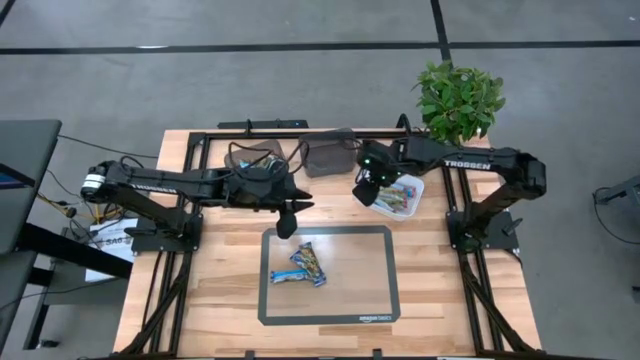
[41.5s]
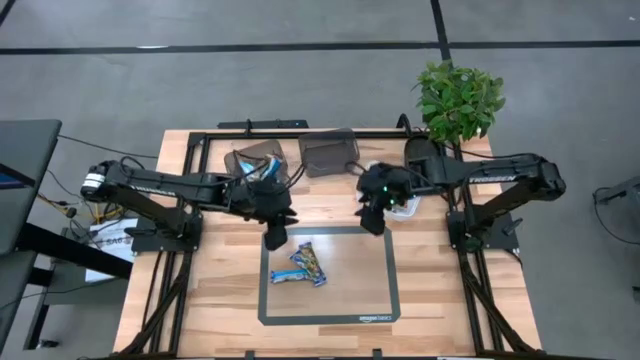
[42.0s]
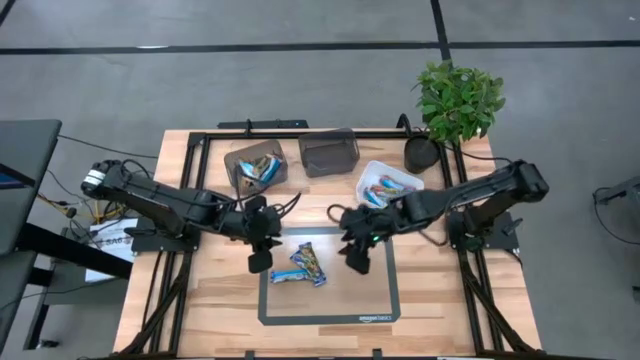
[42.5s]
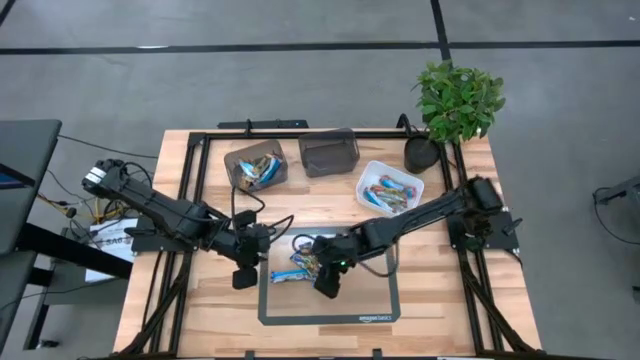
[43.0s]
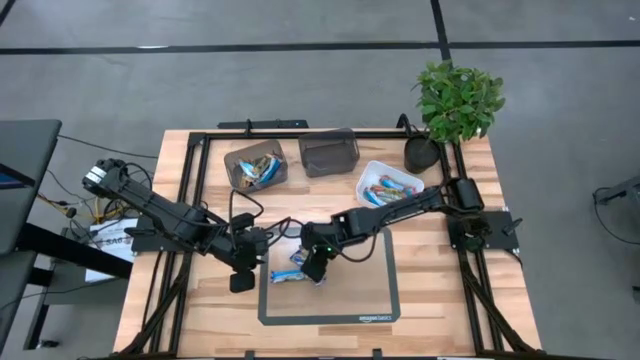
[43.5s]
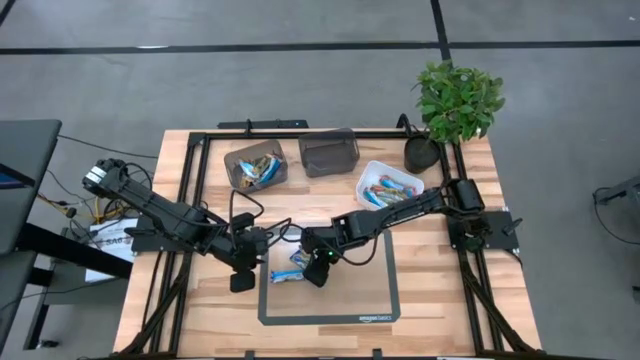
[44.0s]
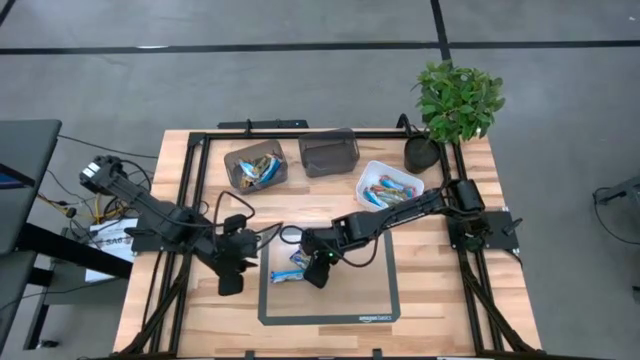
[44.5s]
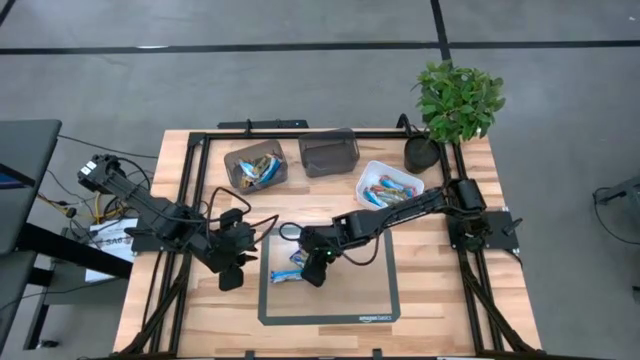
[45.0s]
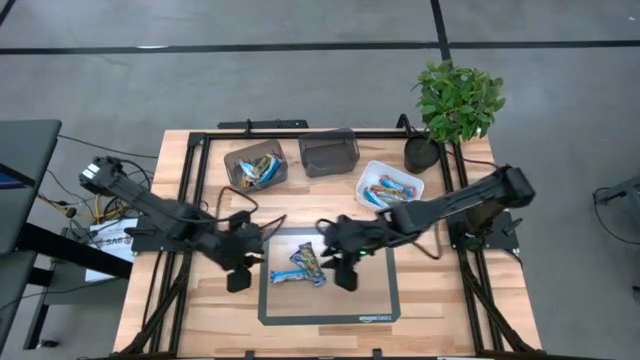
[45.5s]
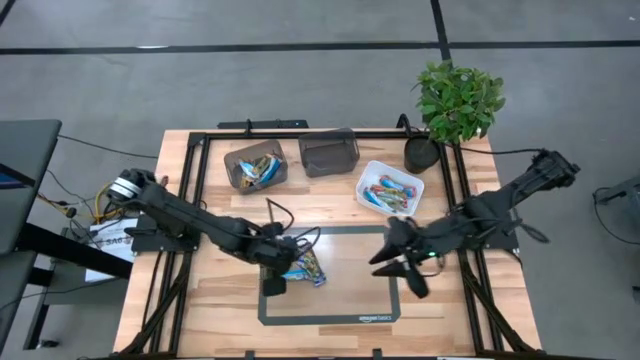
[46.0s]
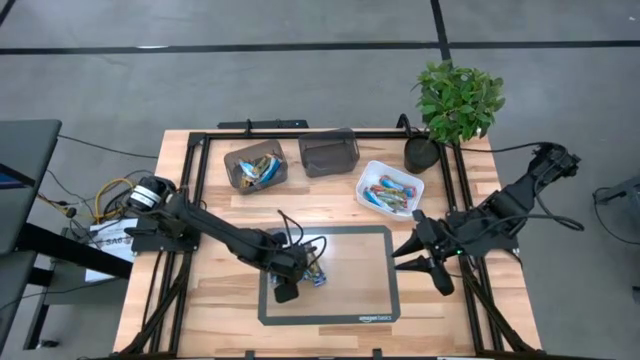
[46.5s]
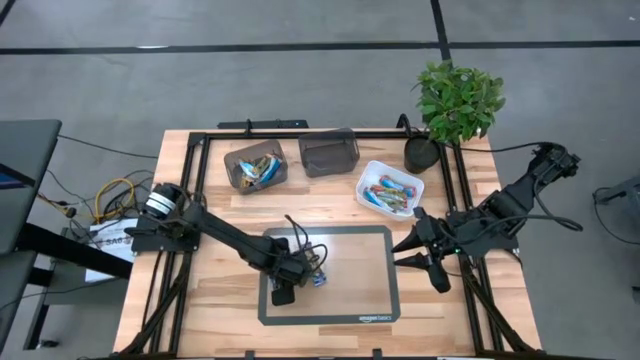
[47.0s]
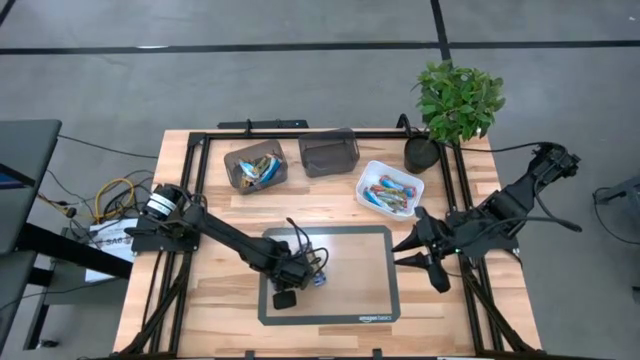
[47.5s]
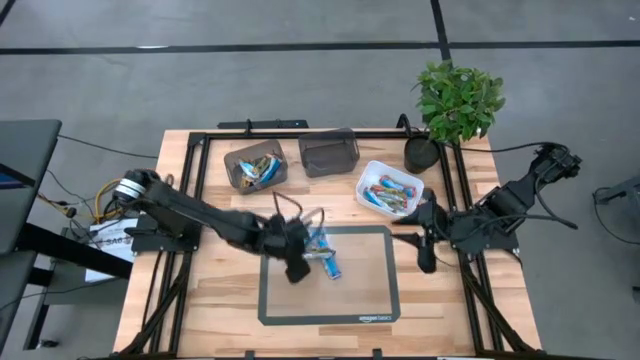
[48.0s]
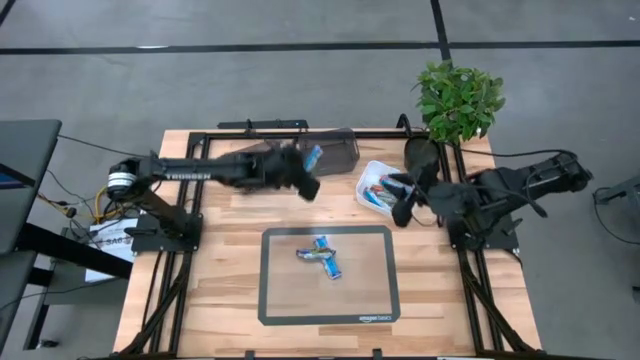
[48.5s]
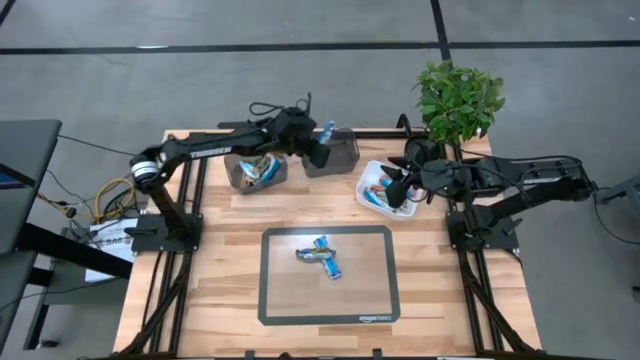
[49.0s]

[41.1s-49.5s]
Task: Pick and place Granola Bars by type
Put the blue granola bar into the right black bin

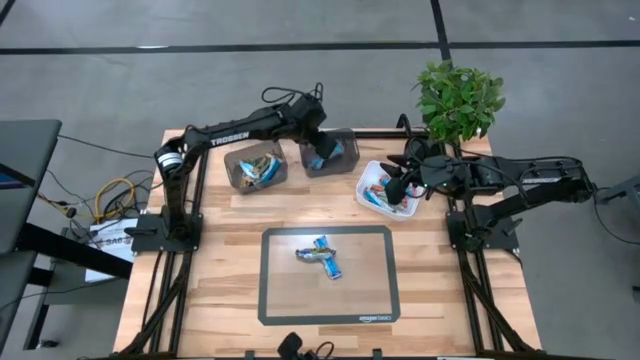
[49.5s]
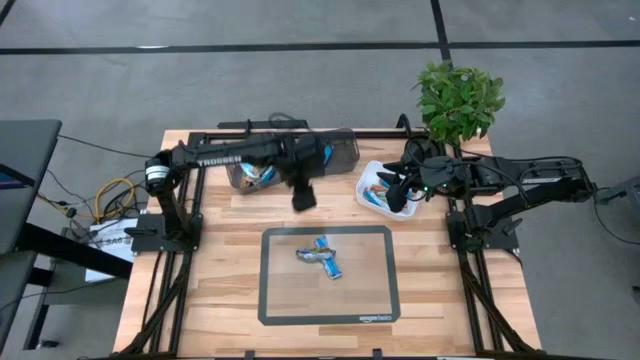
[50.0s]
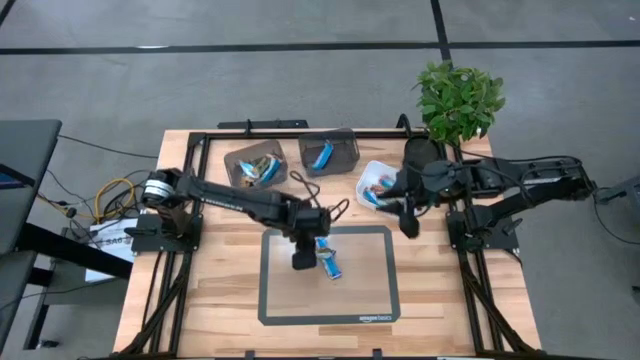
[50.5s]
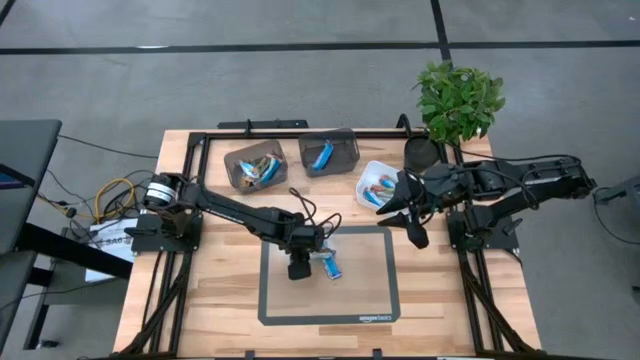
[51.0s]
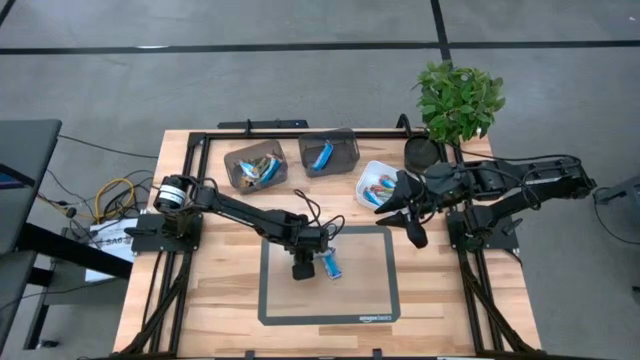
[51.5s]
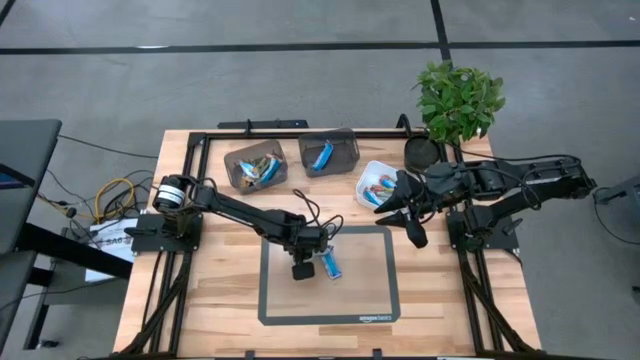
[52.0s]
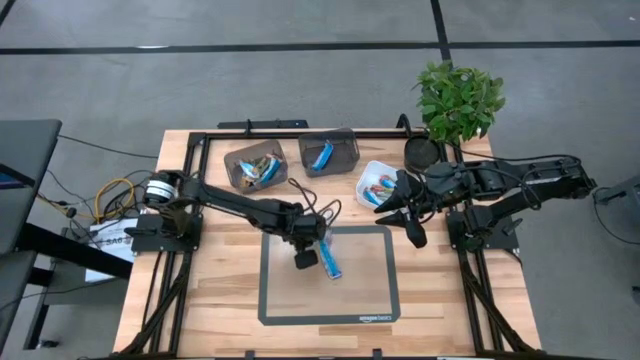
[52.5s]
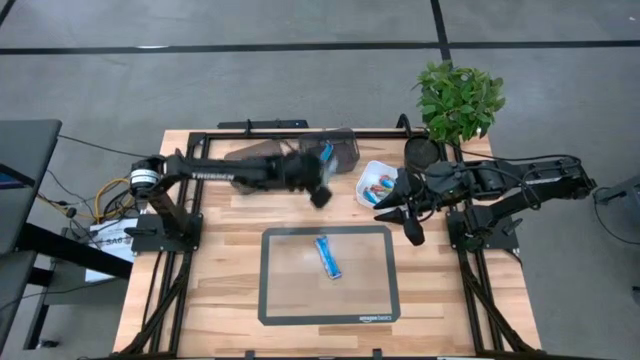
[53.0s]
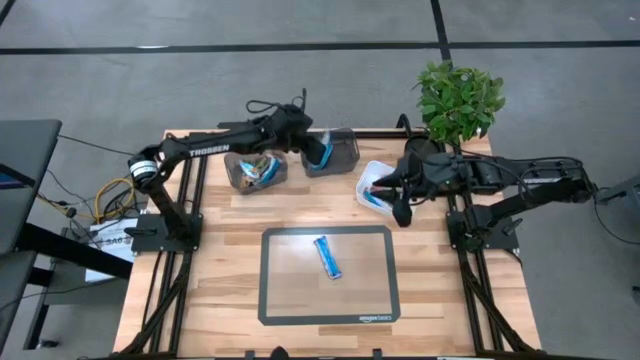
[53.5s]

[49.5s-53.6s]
Put the blue granola bar into the right black bin

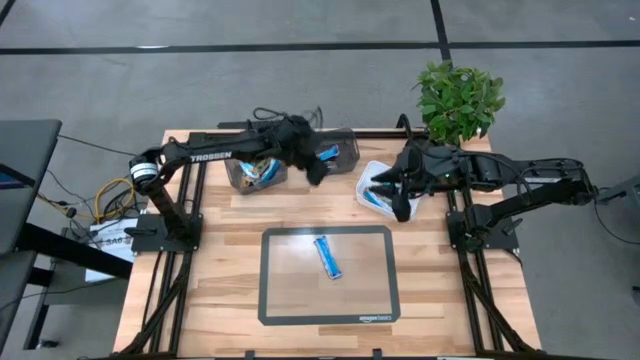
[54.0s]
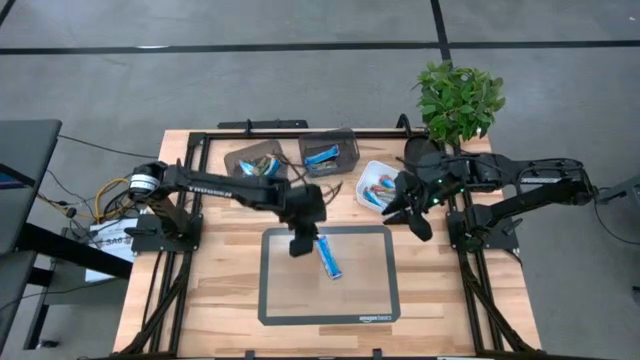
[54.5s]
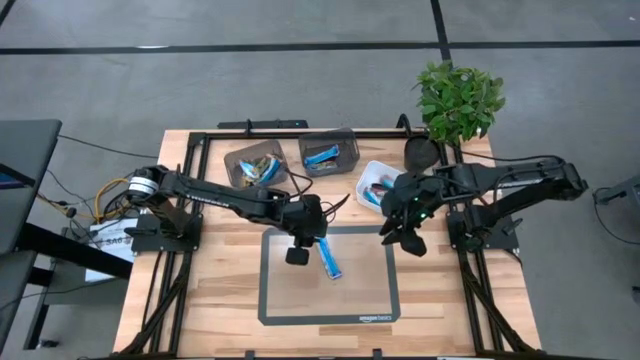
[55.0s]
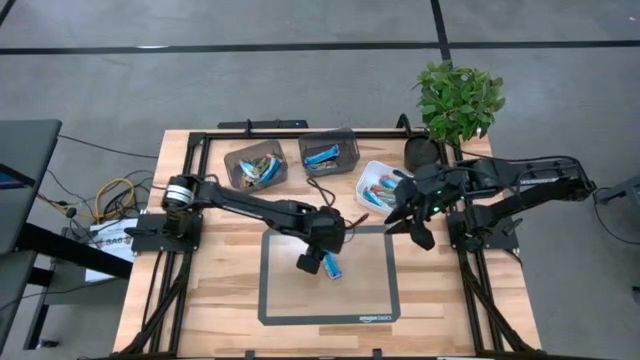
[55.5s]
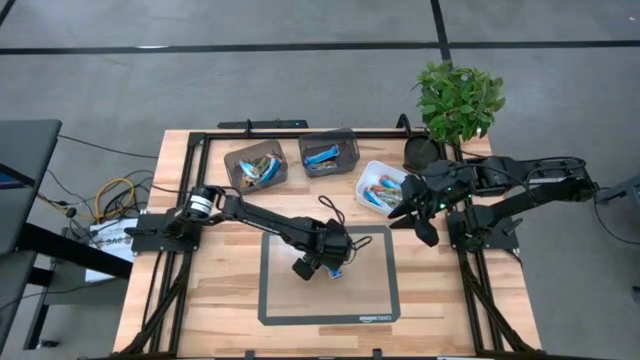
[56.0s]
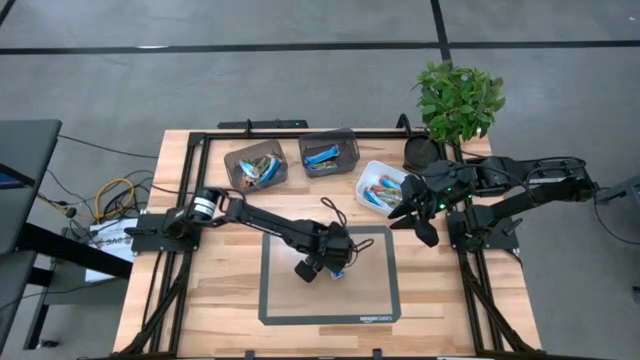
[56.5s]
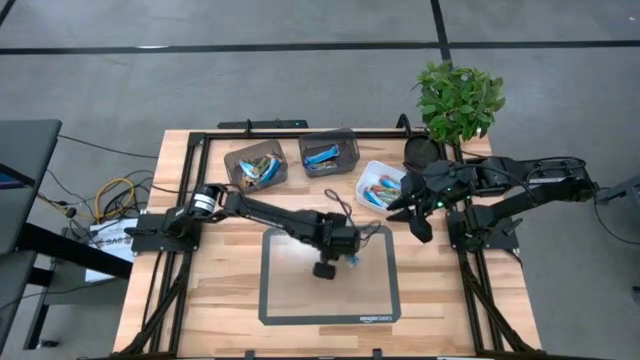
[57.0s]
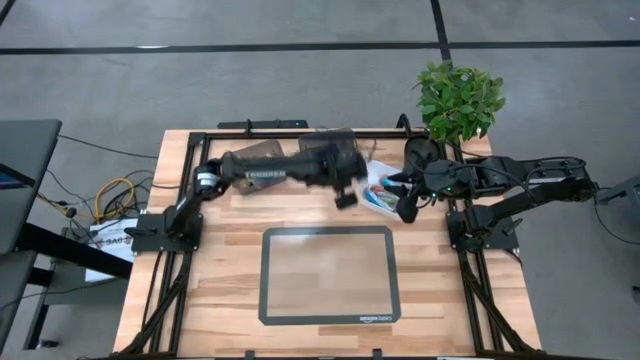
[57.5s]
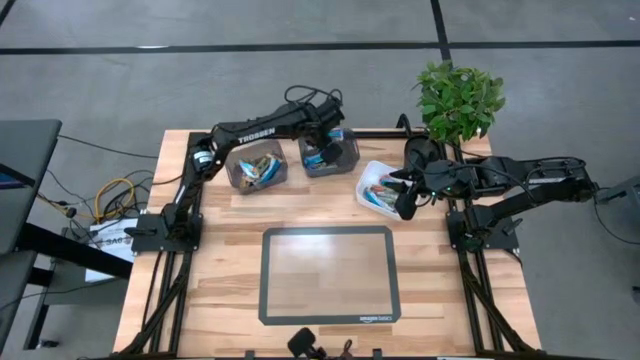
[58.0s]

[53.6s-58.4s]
Put the blue granola bar into the right black bin

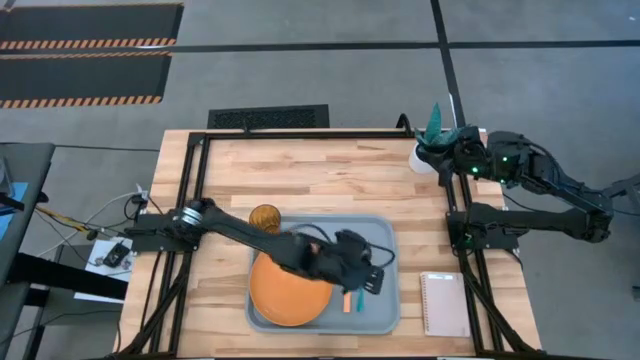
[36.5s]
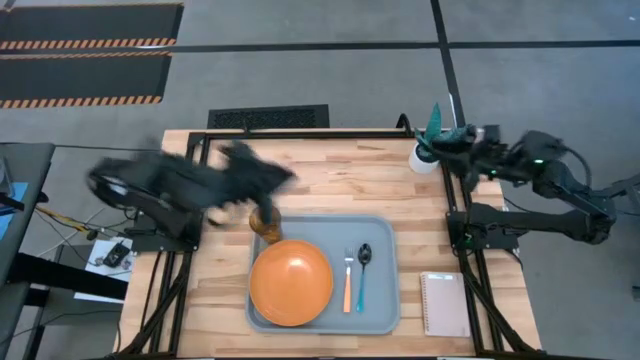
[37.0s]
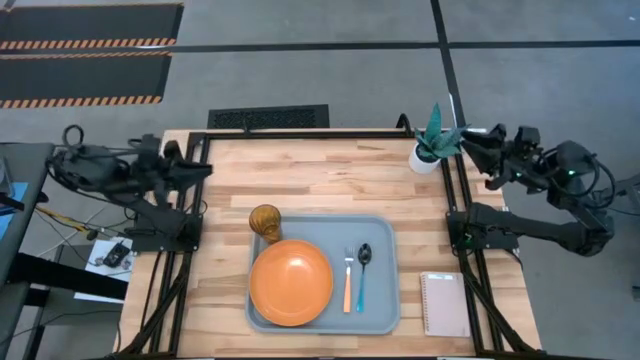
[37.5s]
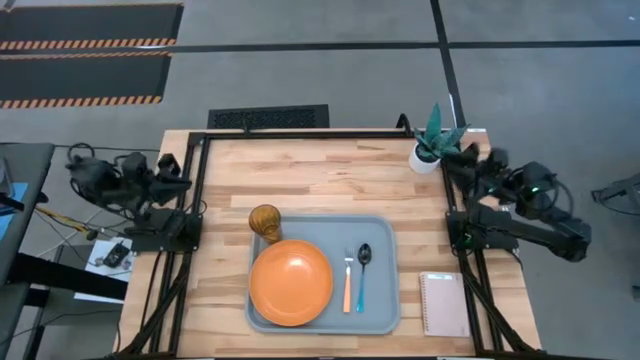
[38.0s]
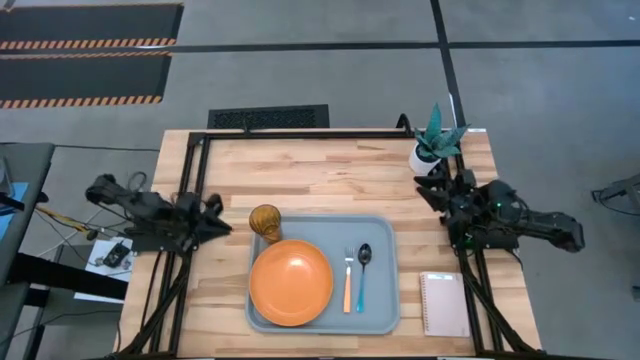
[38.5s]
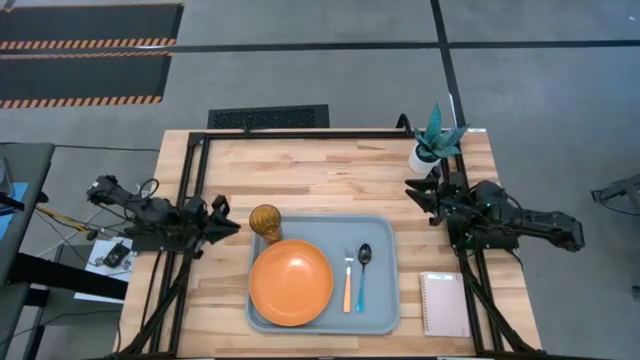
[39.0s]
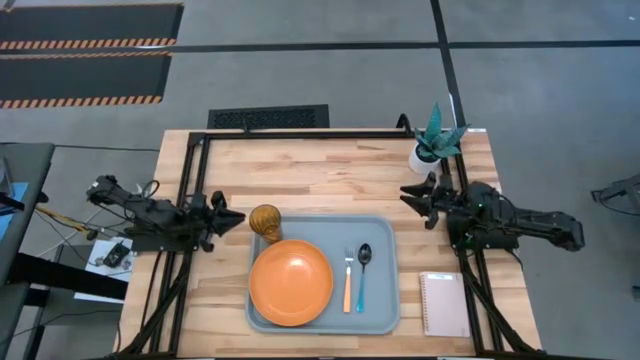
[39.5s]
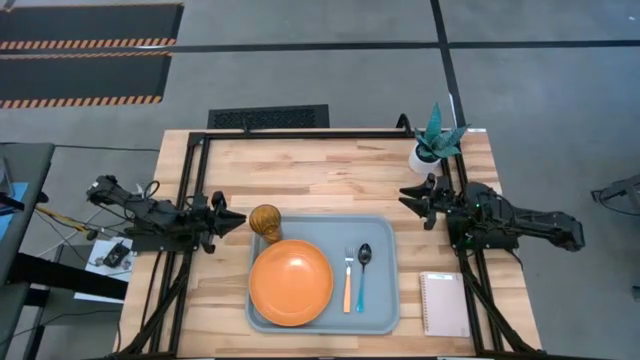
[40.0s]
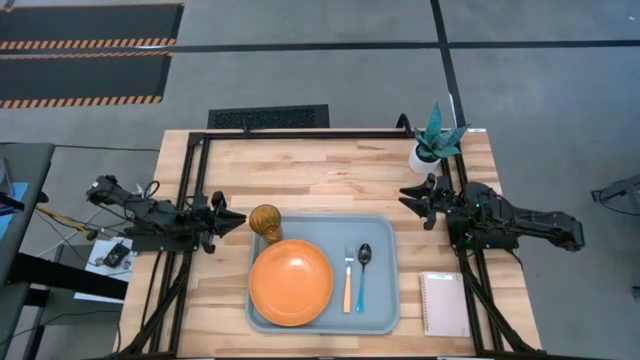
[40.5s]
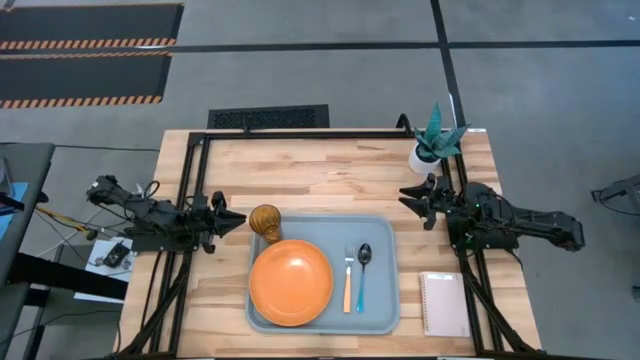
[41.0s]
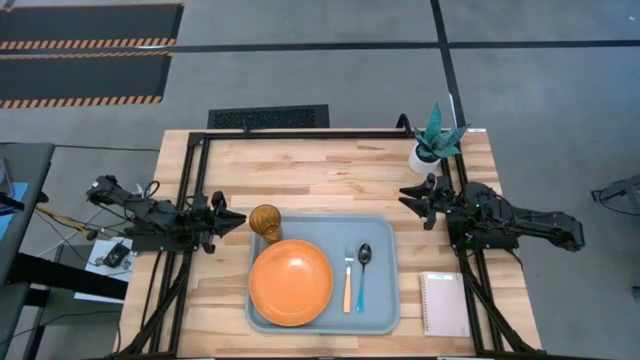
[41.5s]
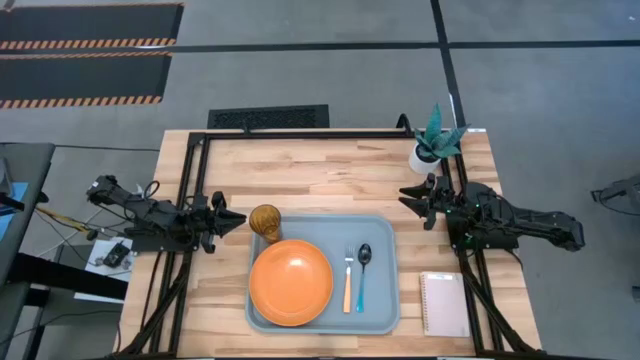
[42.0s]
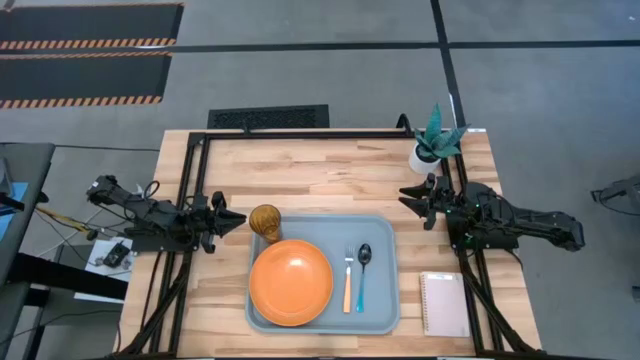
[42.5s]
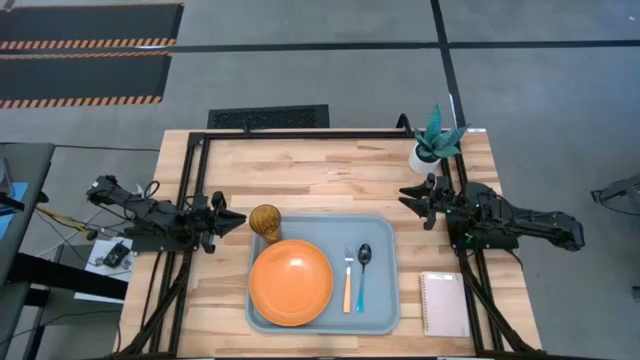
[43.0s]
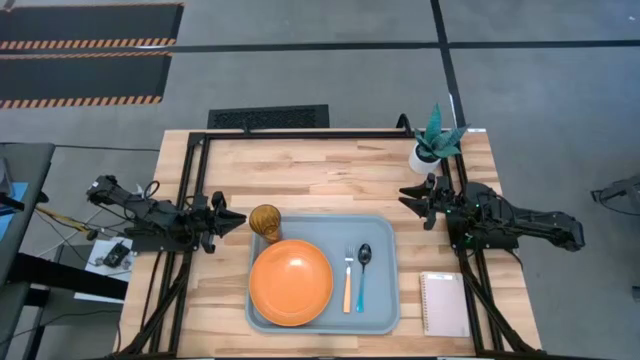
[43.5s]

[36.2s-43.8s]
Task: Pick and place plate/cup/fork/spoon on tray
Return to Home Position
